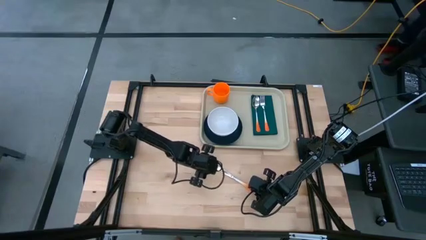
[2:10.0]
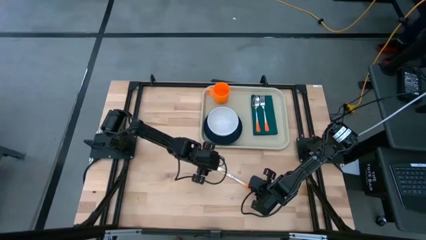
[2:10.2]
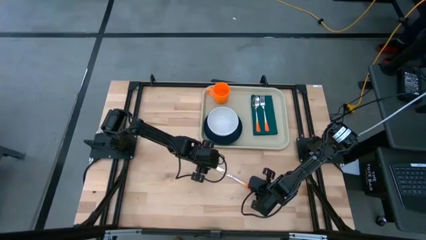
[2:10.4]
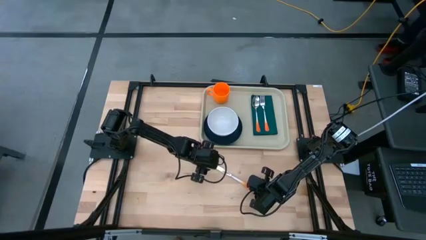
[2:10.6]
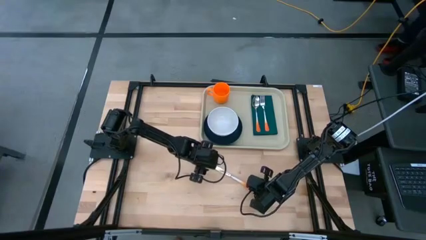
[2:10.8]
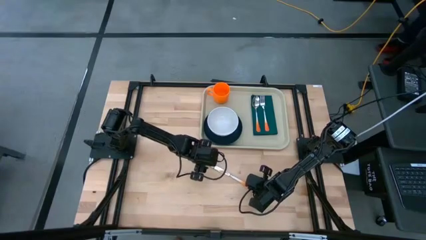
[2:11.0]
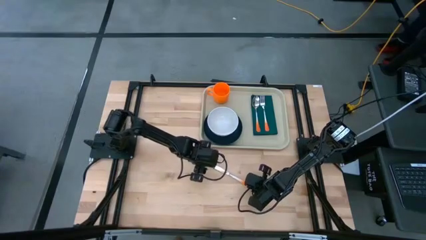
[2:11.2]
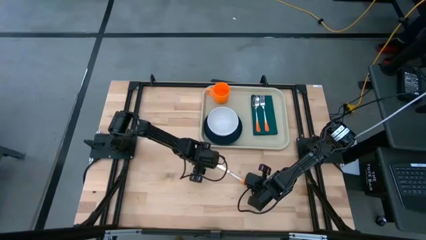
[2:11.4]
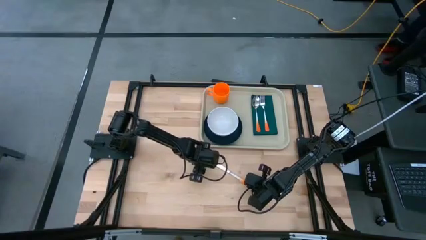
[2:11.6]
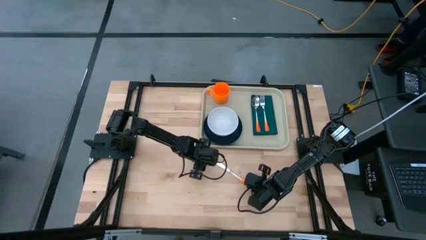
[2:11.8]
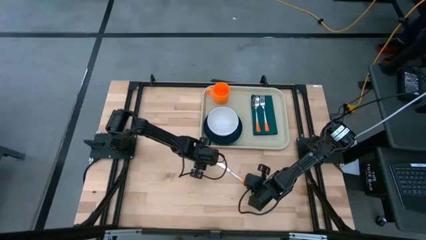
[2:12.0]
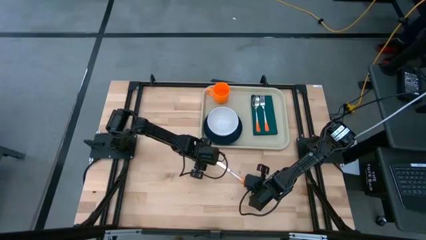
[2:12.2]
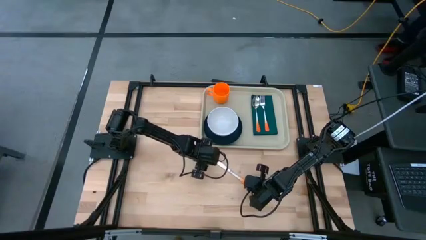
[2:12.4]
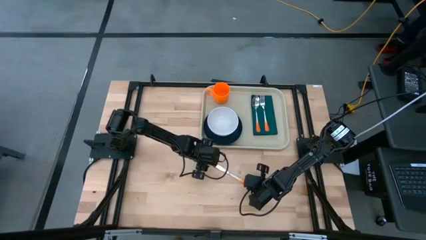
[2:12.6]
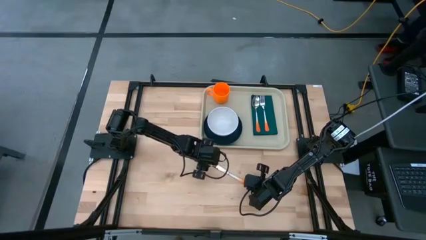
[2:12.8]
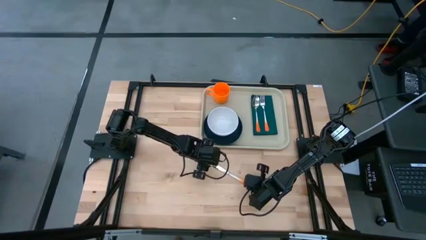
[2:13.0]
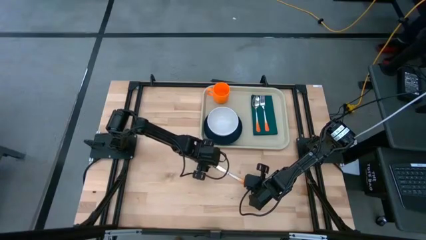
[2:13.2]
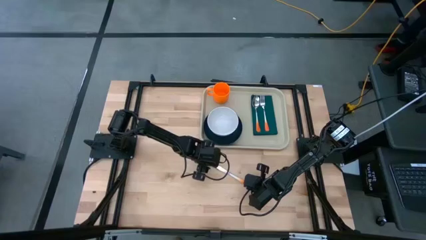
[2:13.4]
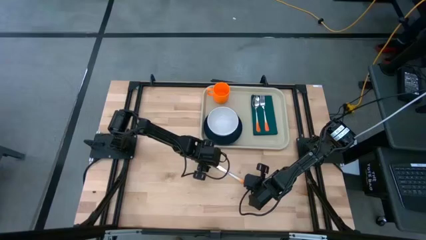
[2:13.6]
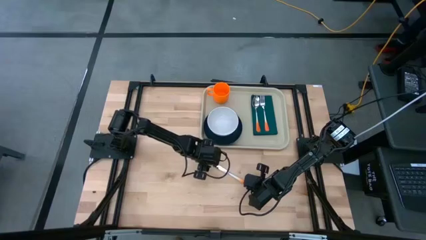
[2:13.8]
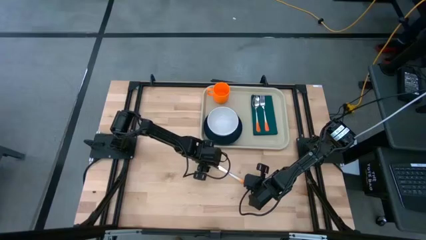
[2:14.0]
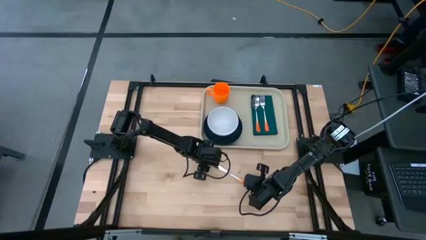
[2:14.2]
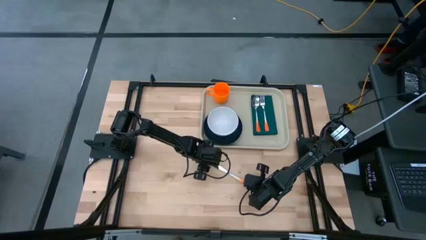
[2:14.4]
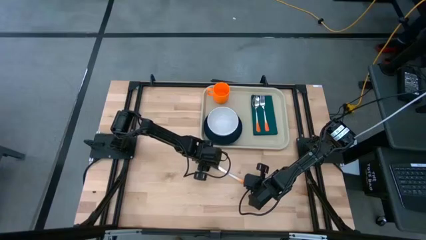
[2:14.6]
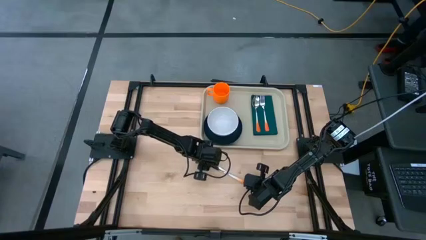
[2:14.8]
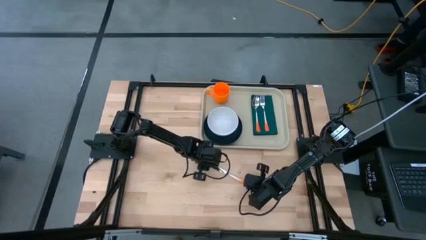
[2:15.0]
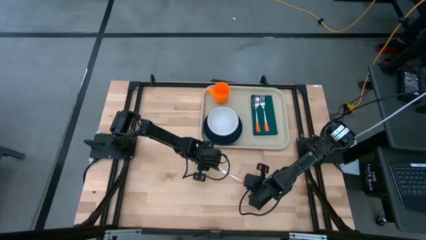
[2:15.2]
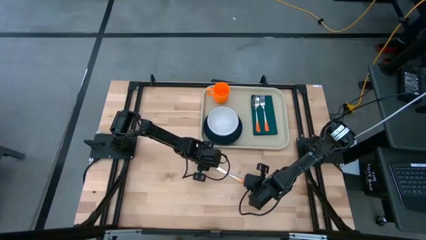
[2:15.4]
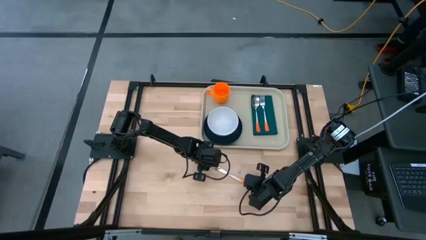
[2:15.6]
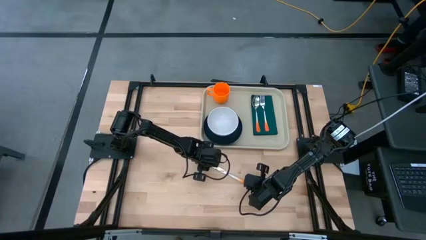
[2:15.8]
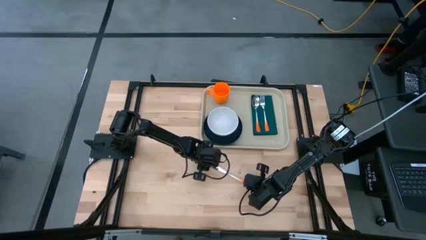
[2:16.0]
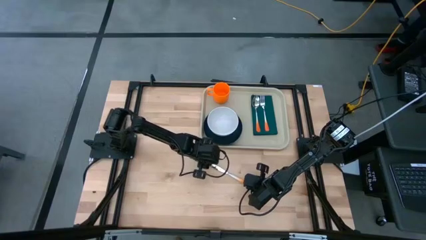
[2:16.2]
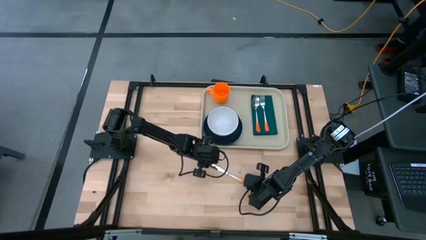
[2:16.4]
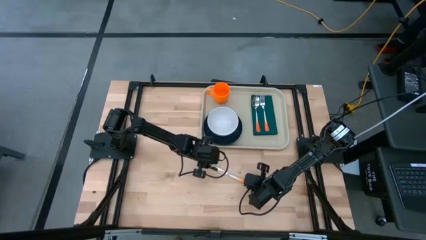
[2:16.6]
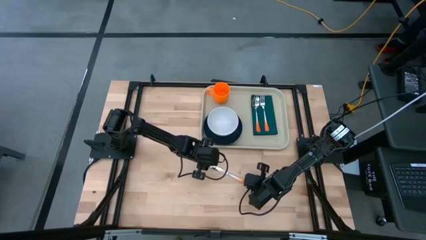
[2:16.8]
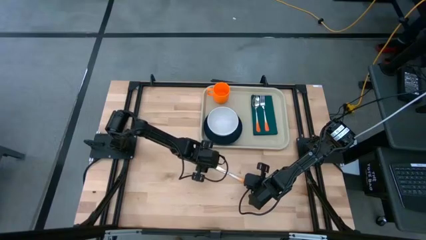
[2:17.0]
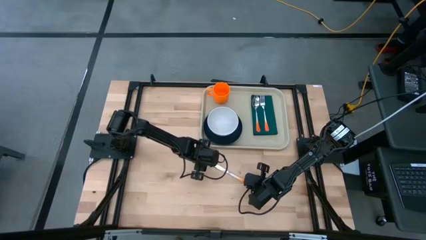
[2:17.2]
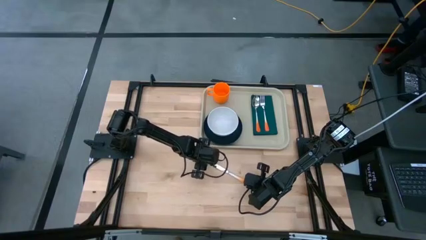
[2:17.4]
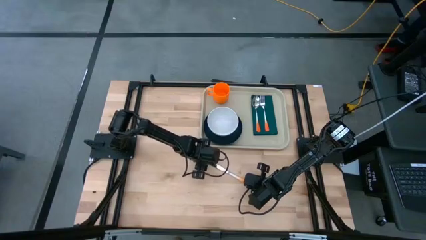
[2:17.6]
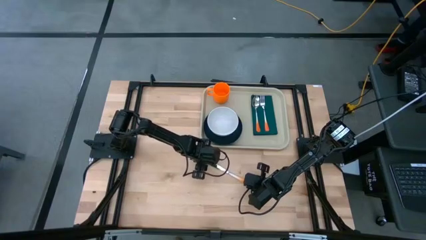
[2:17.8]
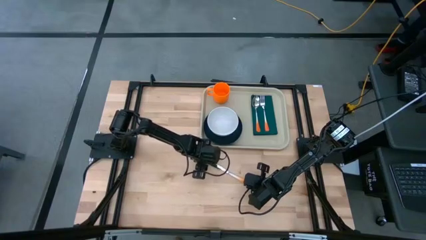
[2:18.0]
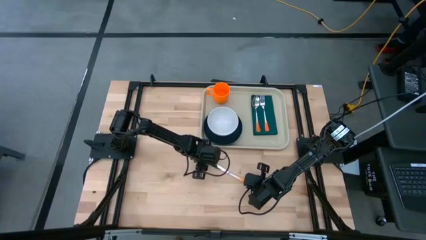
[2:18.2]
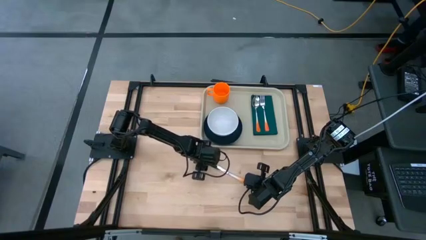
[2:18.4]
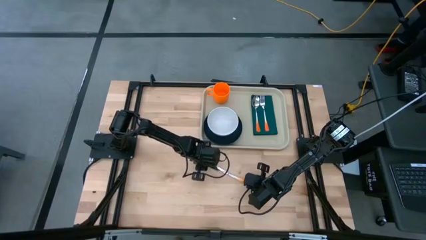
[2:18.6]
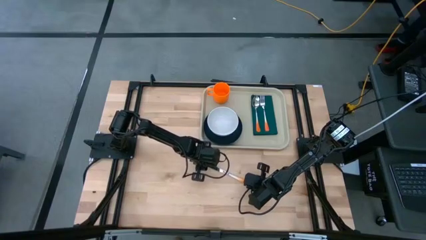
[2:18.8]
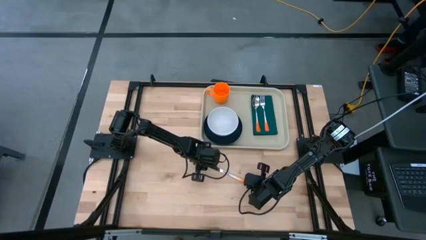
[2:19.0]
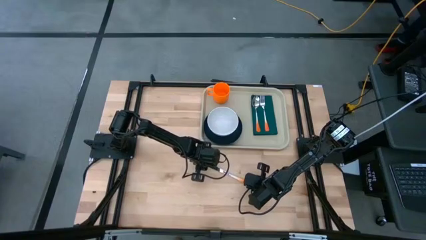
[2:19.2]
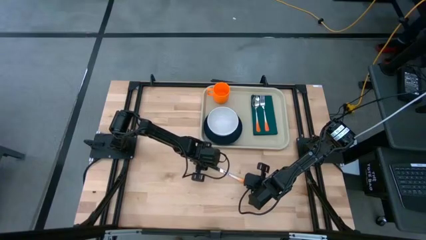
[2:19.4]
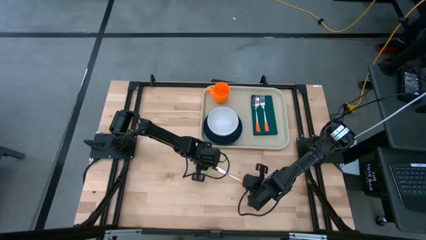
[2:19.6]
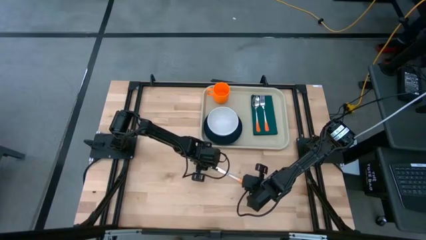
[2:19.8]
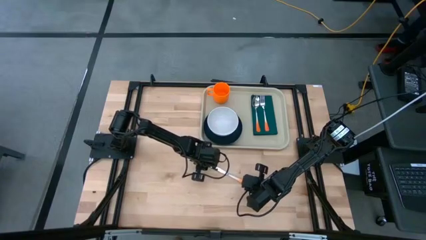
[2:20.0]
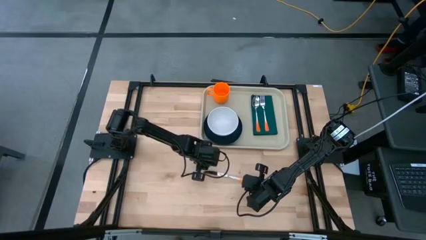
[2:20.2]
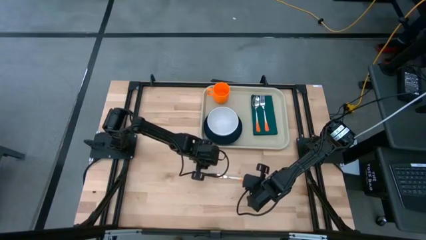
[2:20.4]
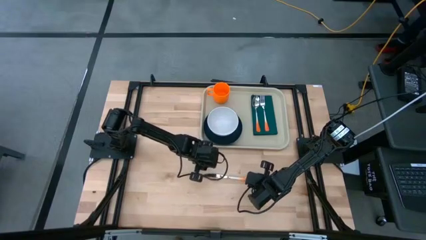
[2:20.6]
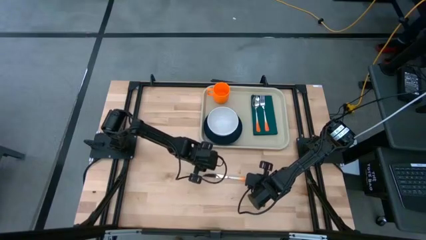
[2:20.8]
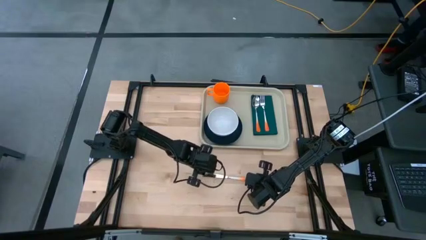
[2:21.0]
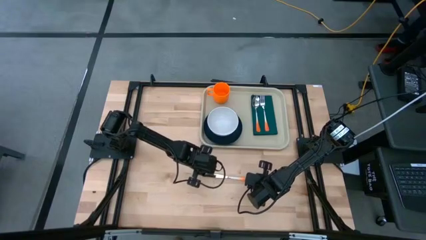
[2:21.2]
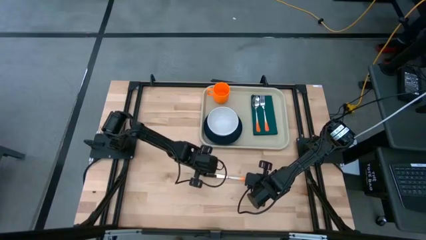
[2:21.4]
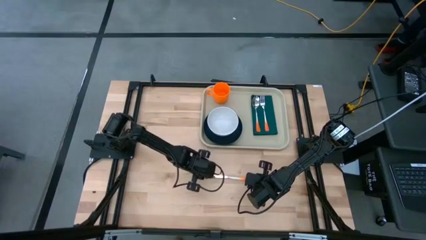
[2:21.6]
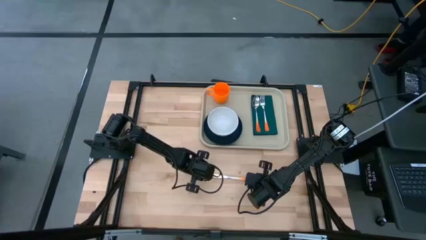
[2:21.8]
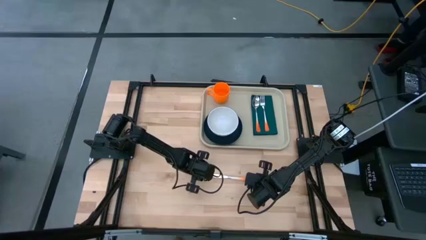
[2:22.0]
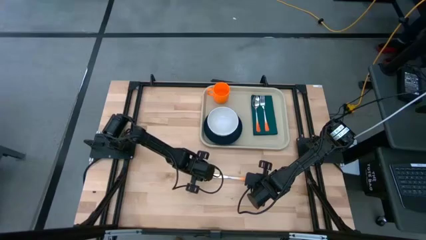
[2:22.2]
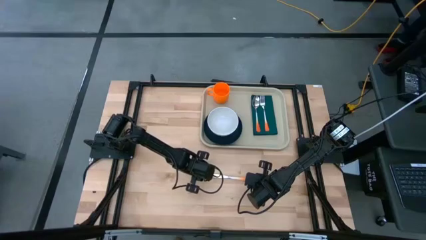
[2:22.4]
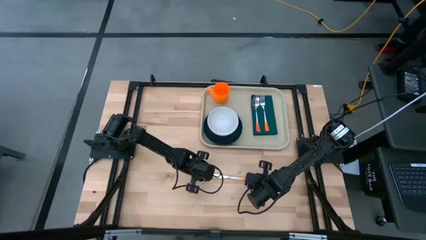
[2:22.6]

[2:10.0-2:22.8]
Task: Set up tray
Put the orange knife to the right of the orange fork on the serving tray

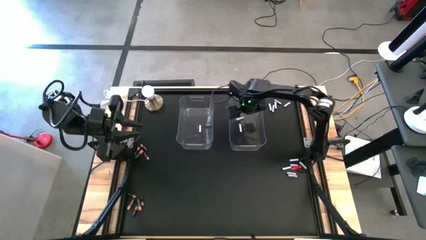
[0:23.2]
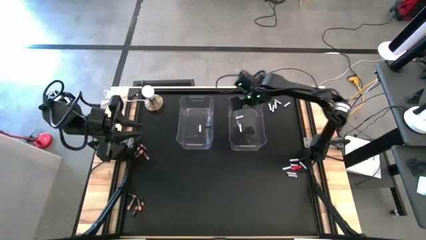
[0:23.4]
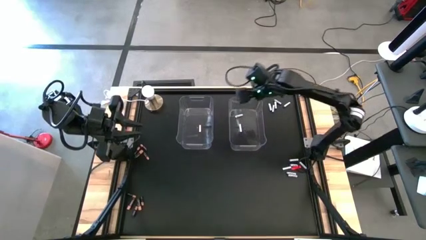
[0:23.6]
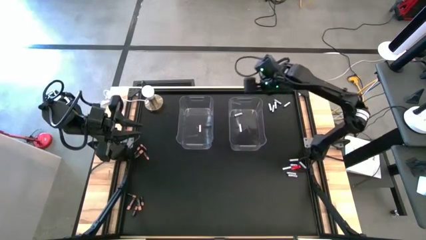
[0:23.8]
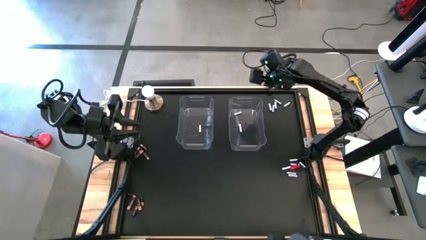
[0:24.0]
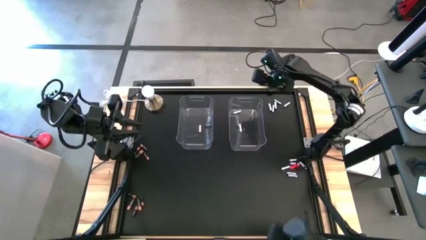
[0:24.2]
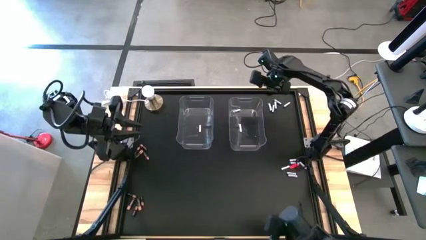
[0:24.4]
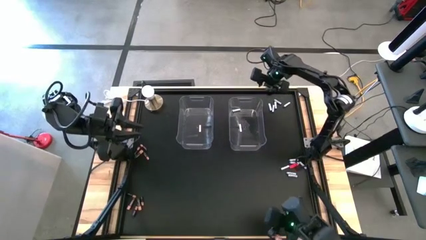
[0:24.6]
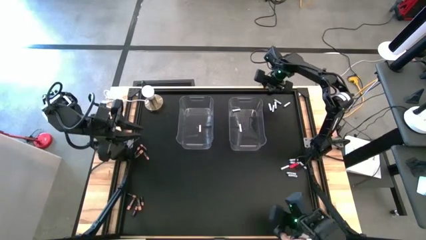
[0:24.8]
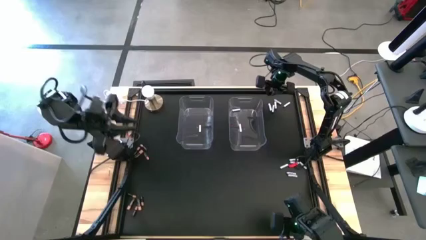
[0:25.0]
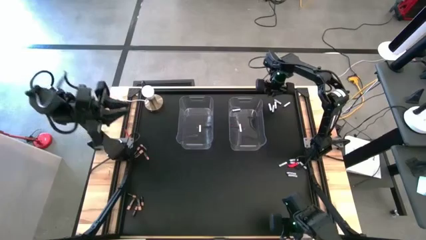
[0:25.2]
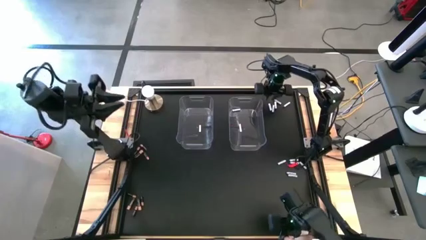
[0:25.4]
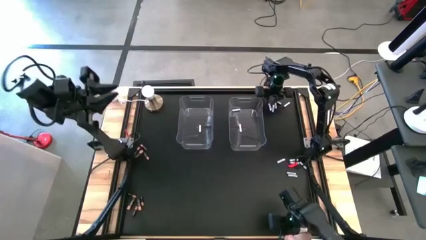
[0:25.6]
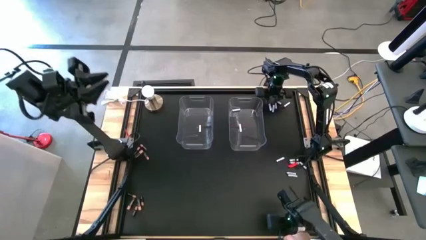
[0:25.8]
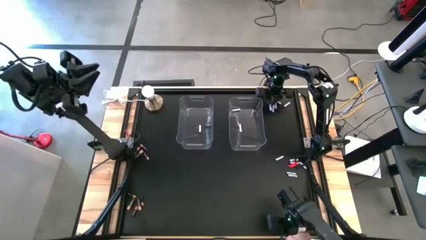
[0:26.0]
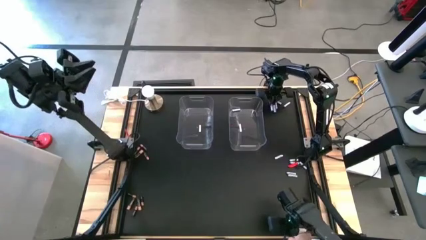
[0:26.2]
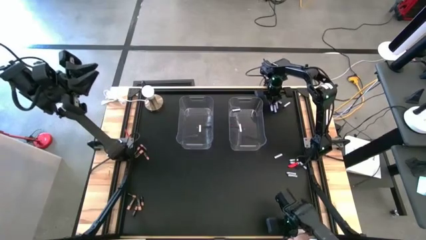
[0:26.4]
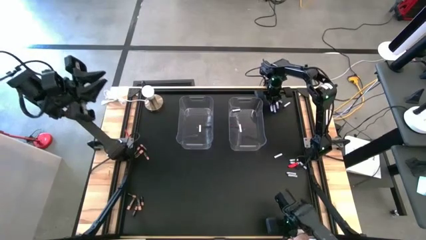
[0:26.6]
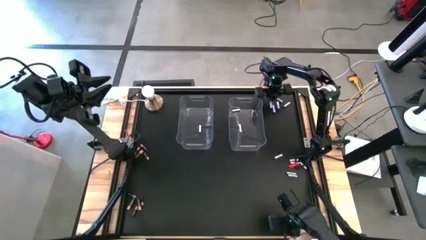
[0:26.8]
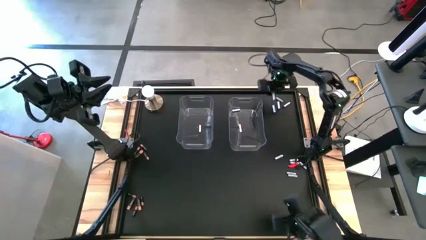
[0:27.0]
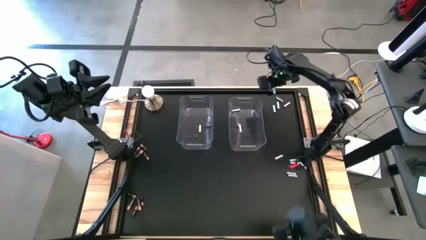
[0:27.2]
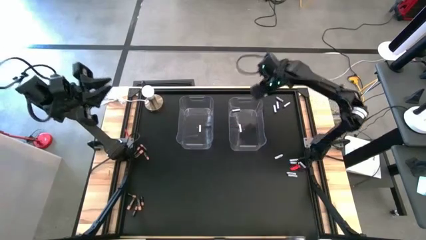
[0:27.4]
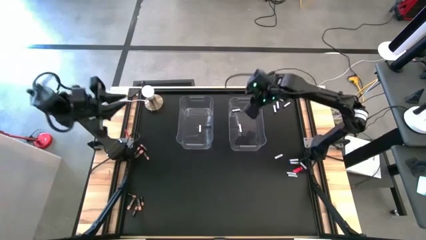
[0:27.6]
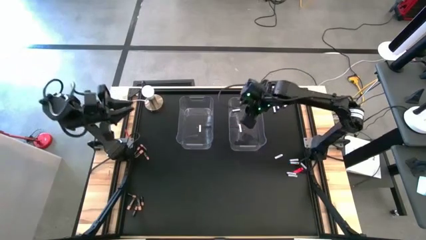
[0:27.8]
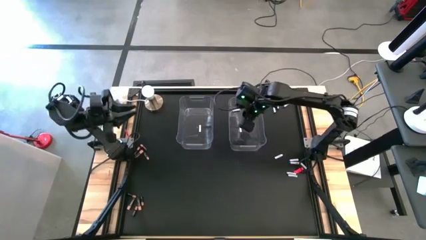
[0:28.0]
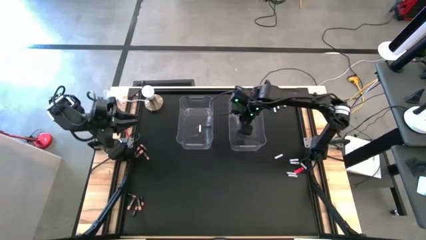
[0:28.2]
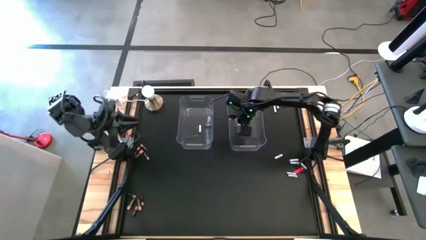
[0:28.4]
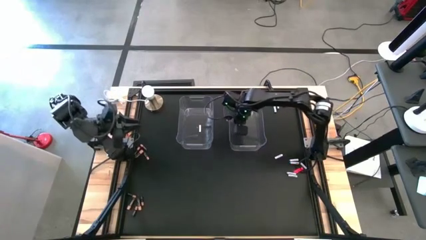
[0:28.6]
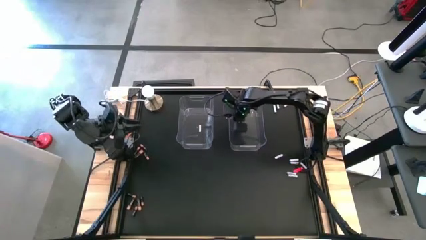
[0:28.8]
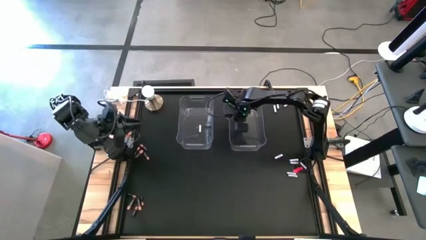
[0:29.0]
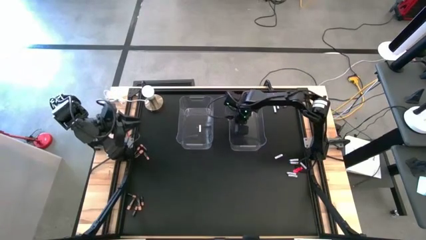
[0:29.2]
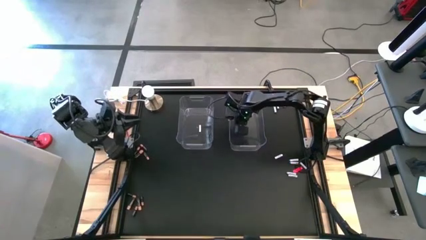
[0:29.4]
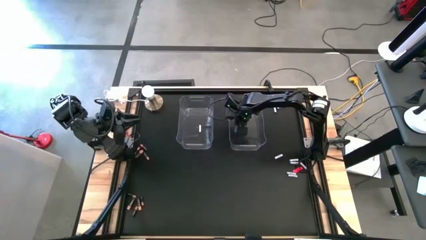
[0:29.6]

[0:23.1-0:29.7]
Task: Sort batteries
Put the white battery into the right transparent bin
